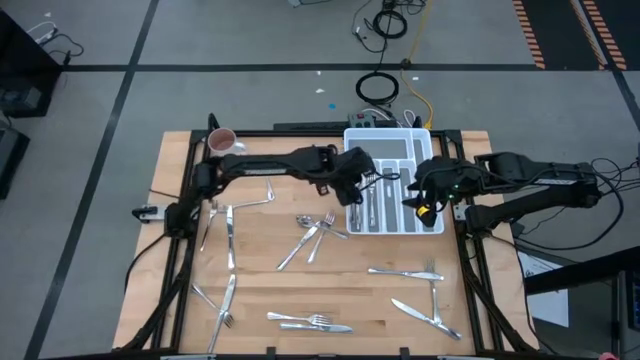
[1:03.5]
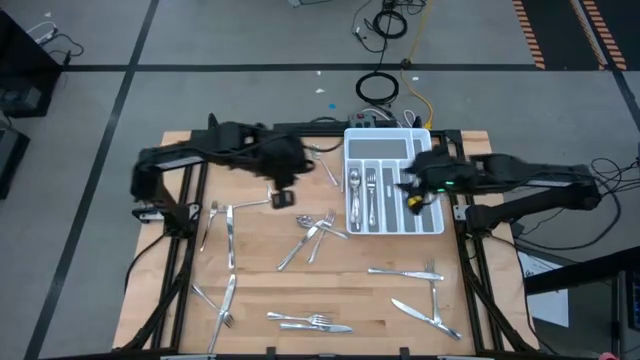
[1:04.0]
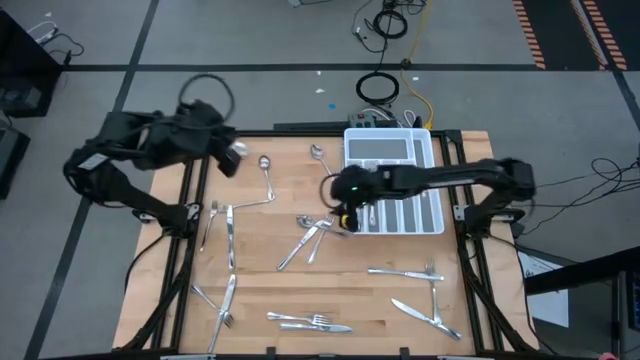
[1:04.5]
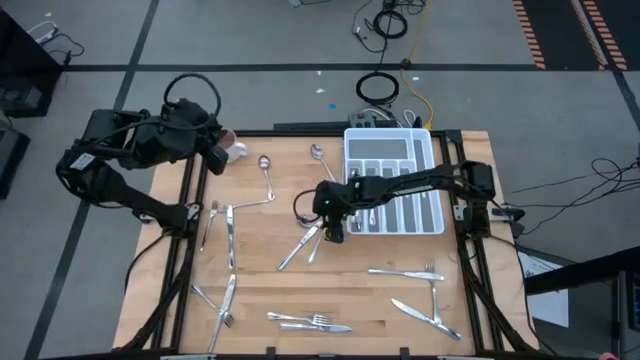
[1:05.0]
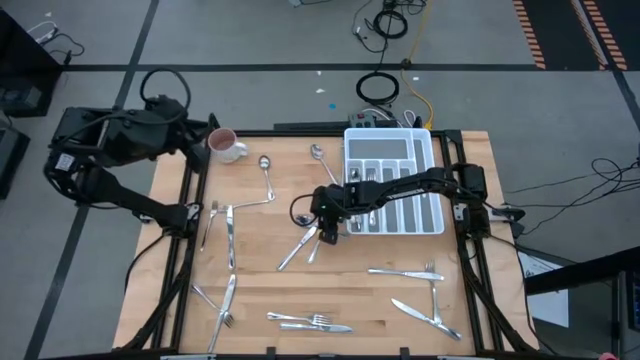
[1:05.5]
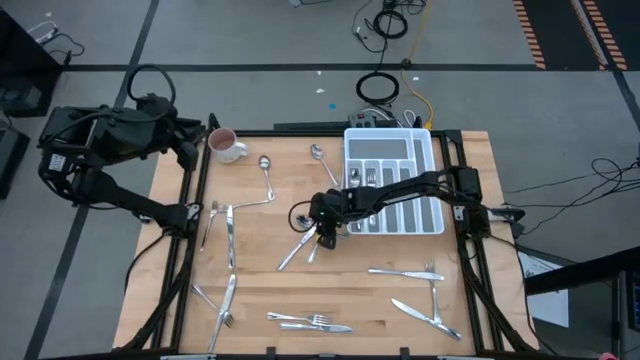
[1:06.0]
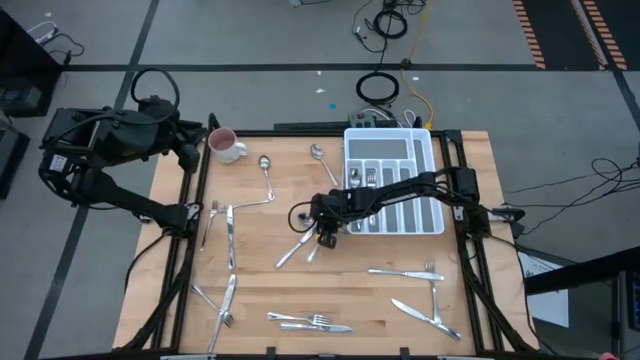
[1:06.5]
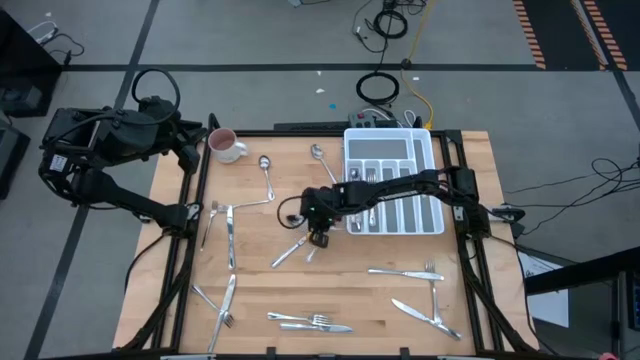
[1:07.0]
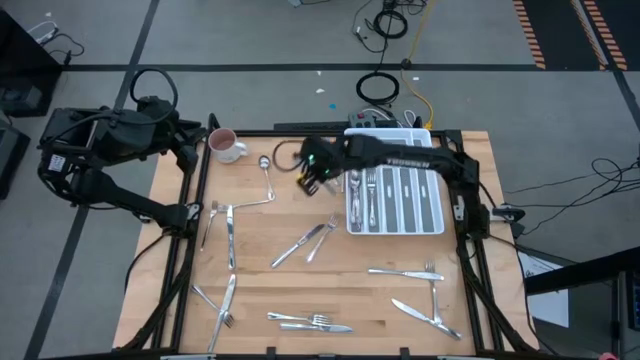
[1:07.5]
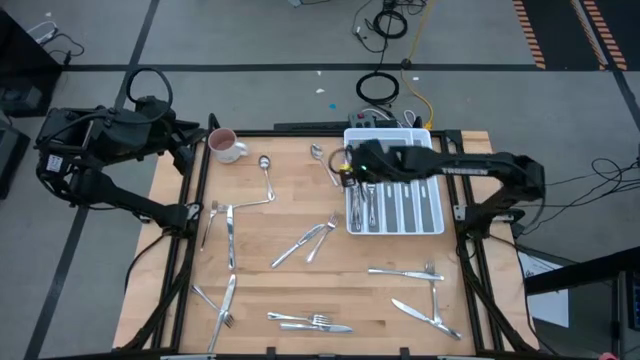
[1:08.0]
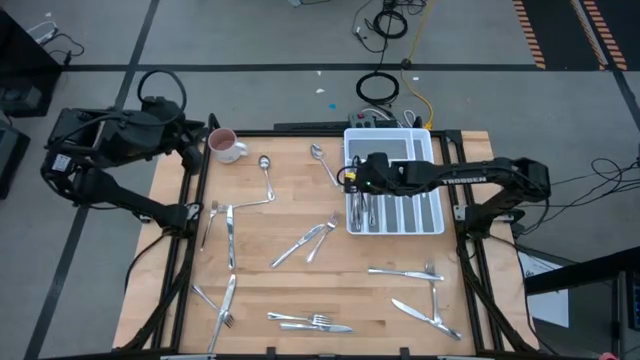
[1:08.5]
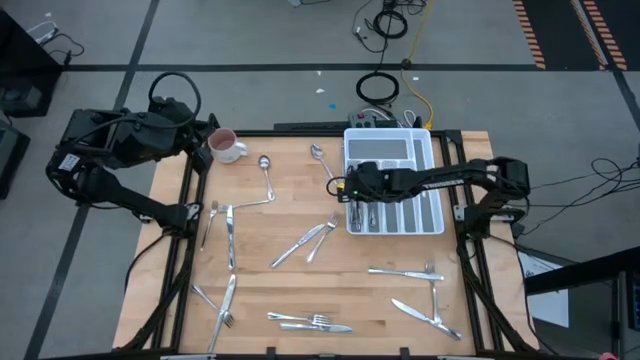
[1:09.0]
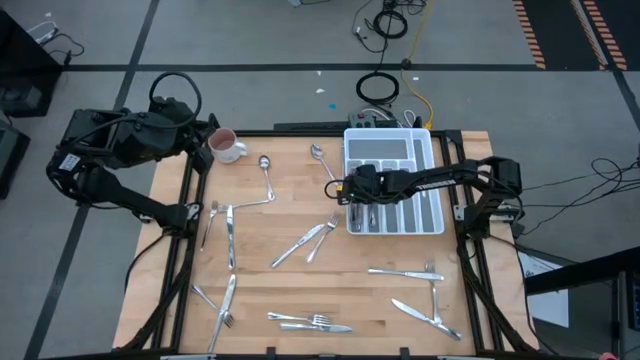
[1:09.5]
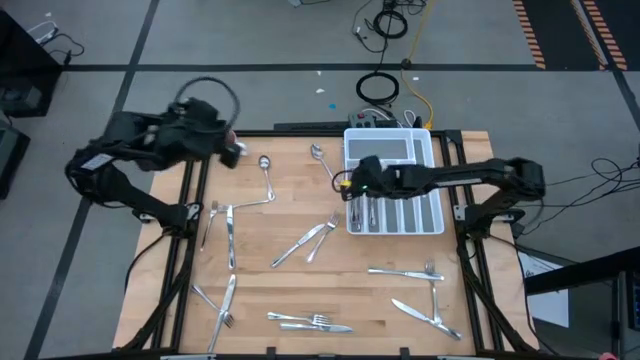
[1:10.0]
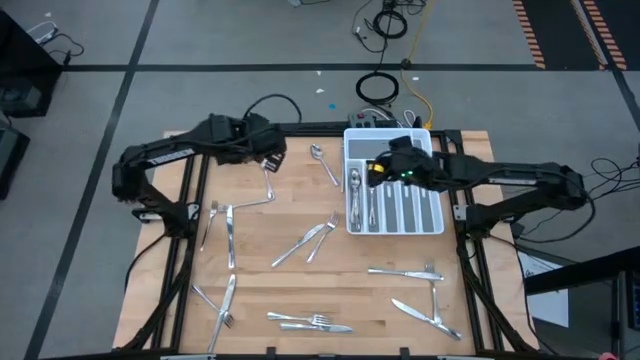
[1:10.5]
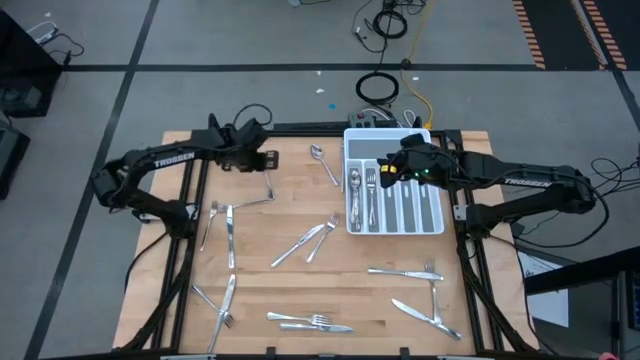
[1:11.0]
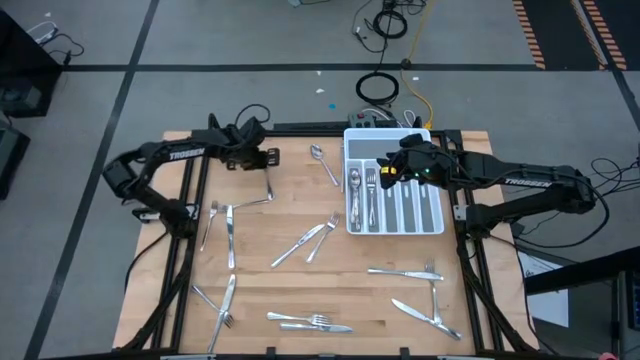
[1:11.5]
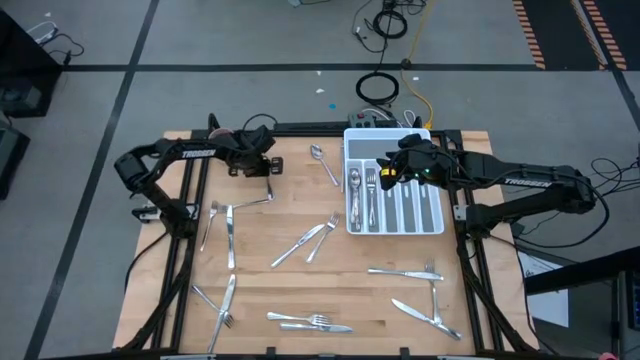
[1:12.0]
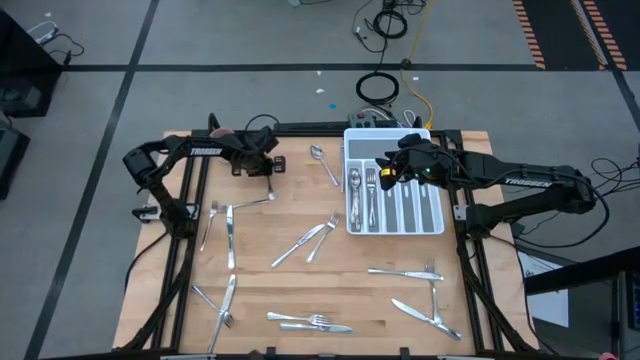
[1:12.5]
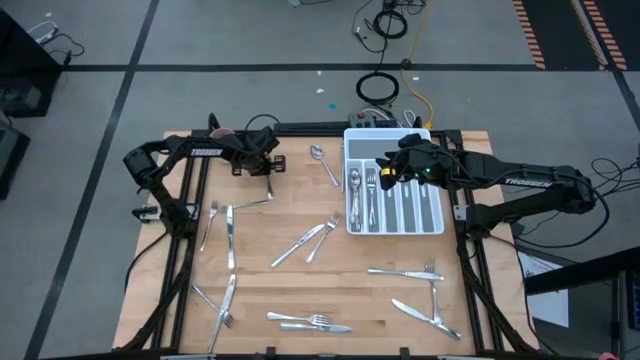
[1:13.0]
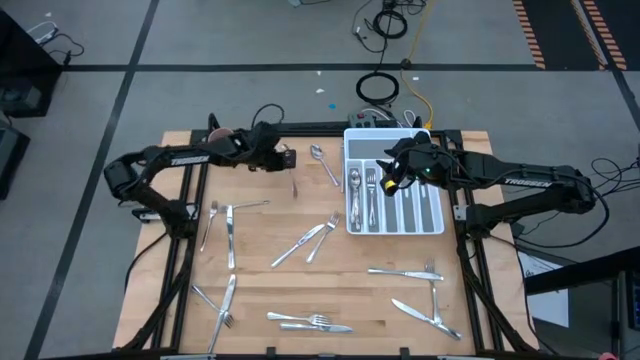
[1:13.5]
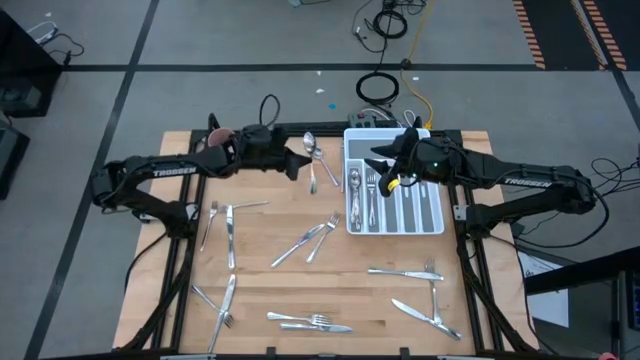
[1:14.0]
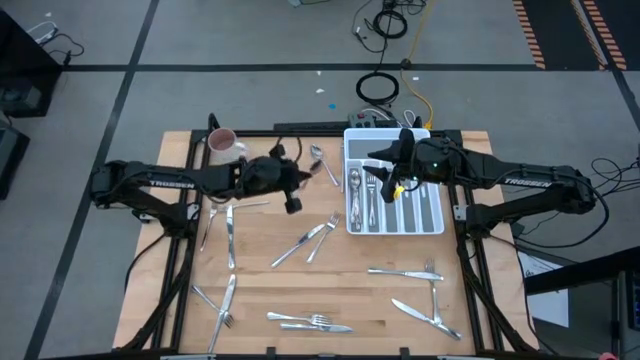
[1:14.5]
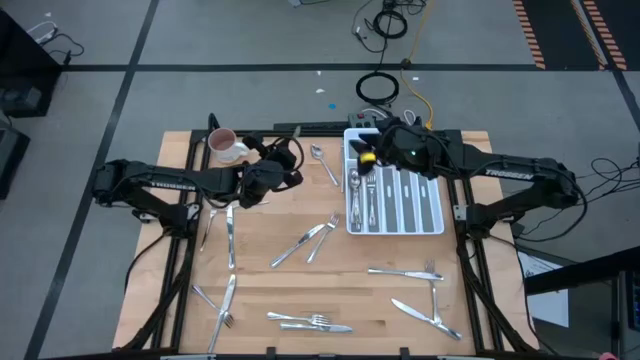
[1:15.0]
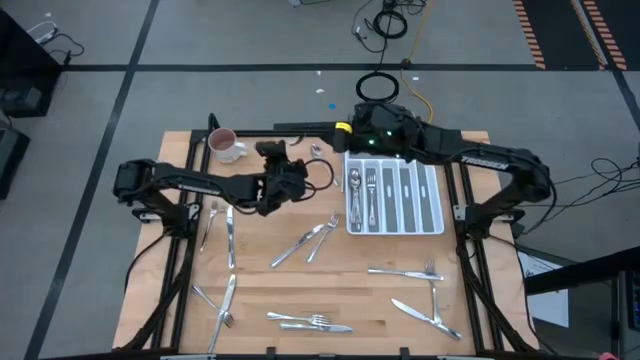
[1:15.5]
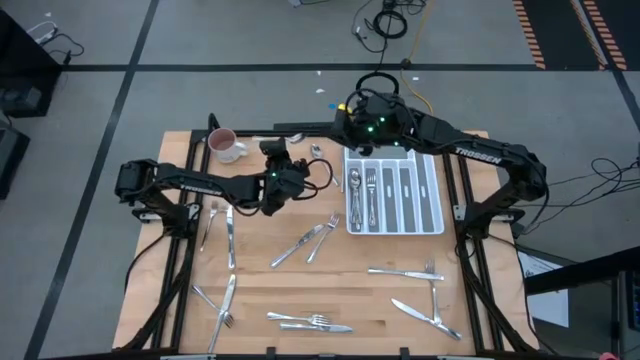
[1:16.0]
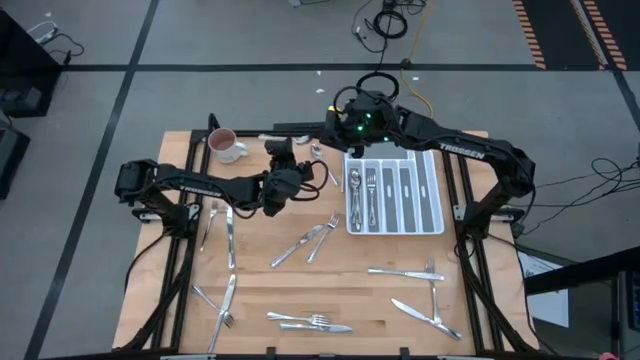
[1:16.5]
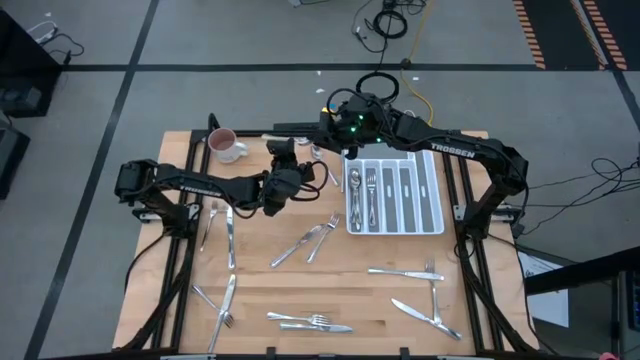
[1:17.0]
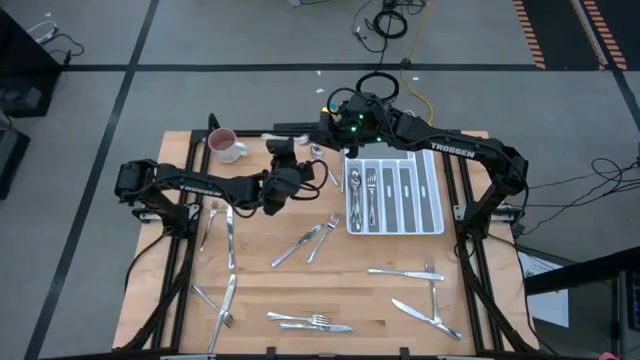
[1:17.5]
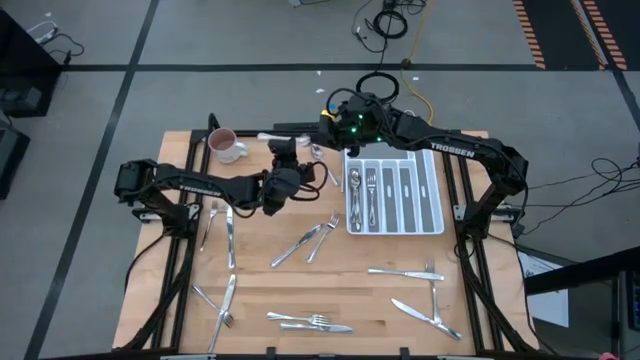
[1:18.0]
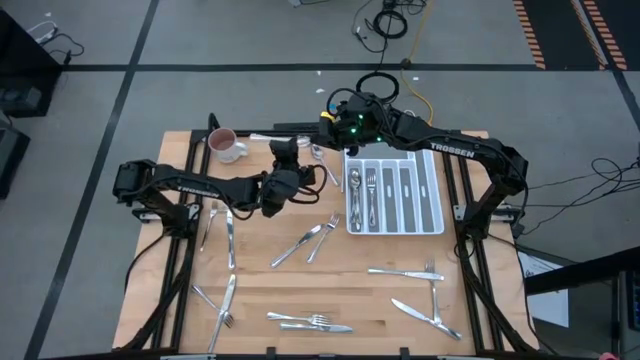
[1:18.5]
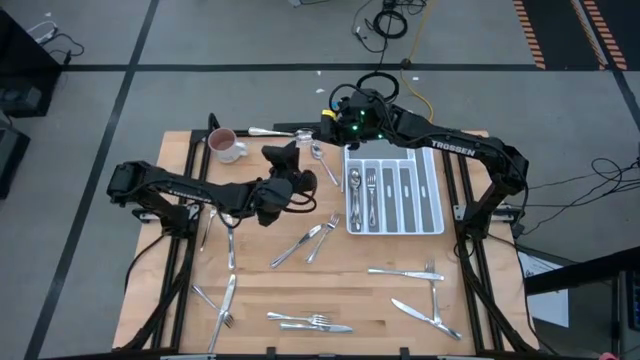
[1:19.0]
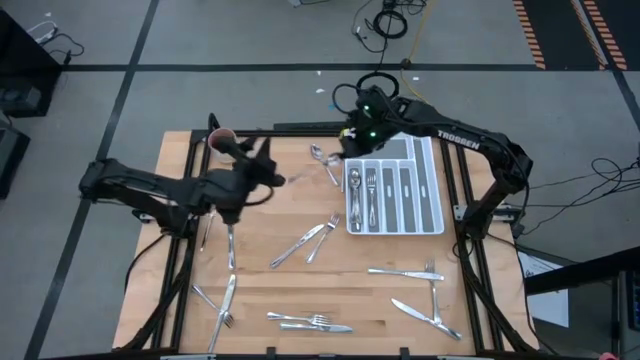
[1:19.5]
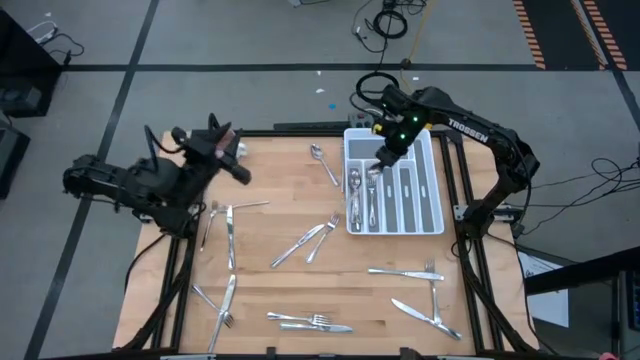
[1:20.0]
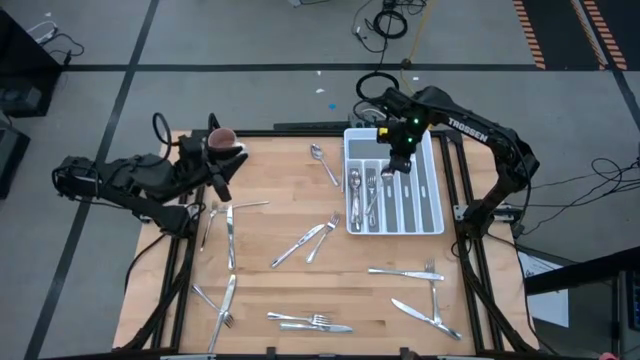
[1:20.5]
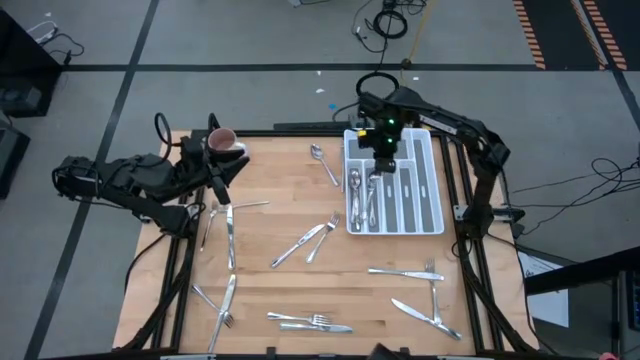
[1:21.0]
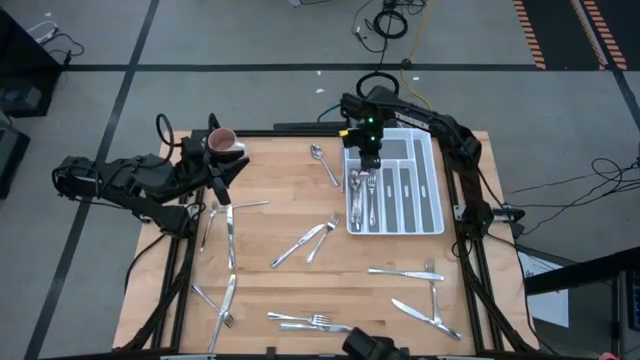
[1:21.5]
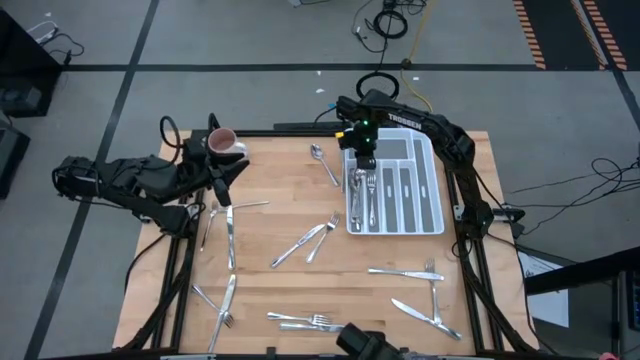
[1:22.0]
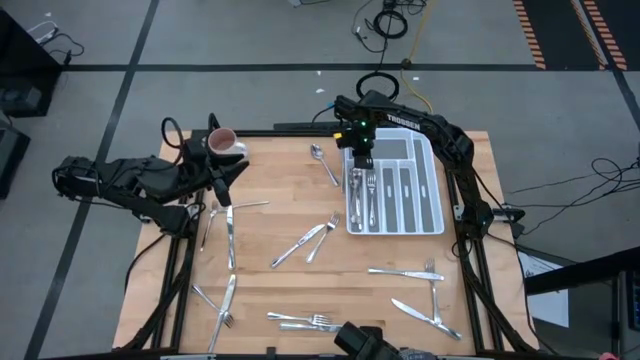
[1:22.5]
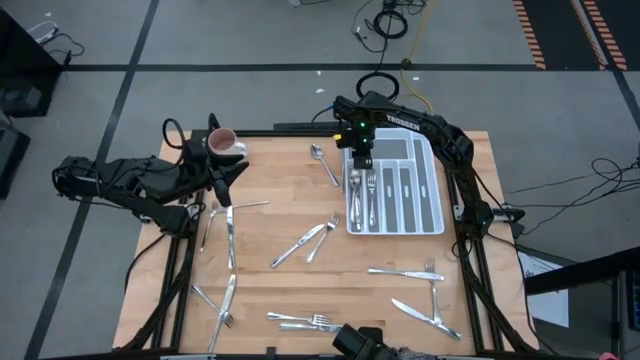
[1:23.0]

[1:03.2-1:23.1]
Task: Sort silverware
Put the silver spoon into the silverware tray

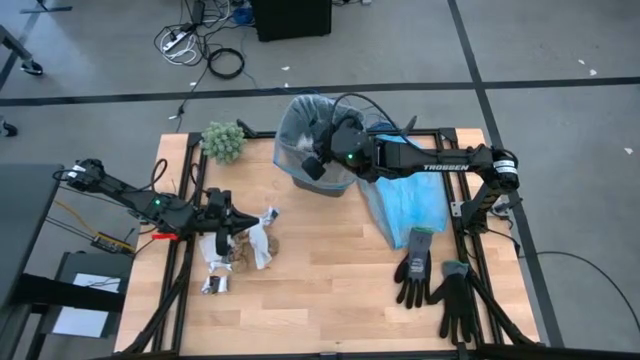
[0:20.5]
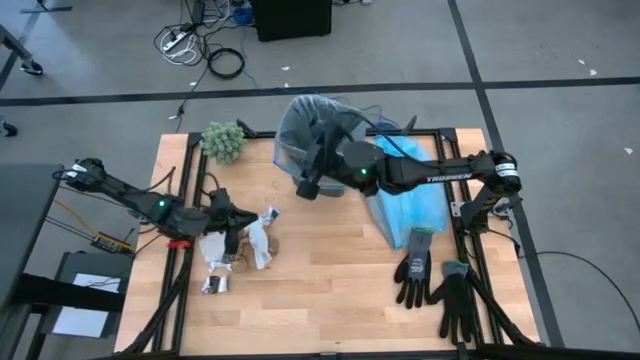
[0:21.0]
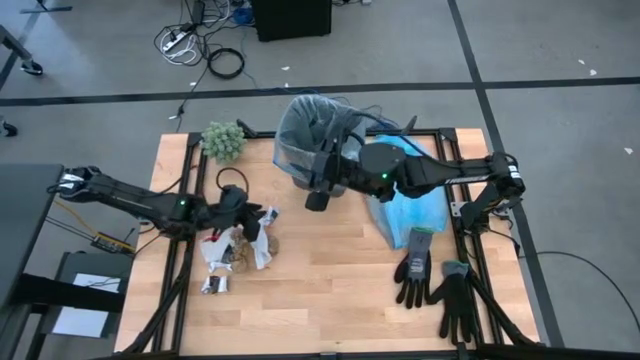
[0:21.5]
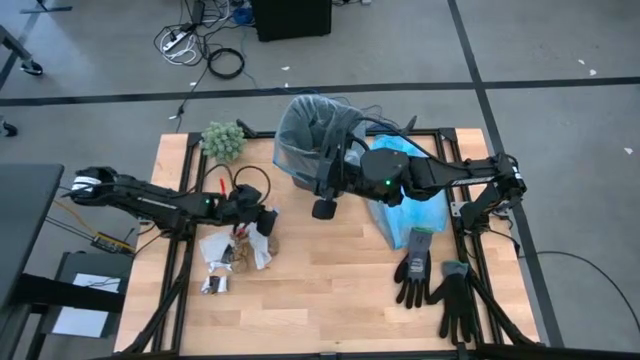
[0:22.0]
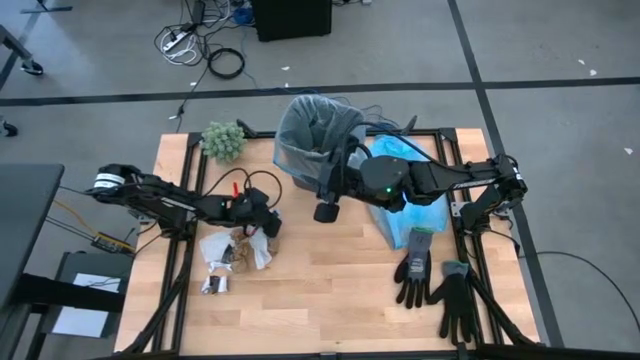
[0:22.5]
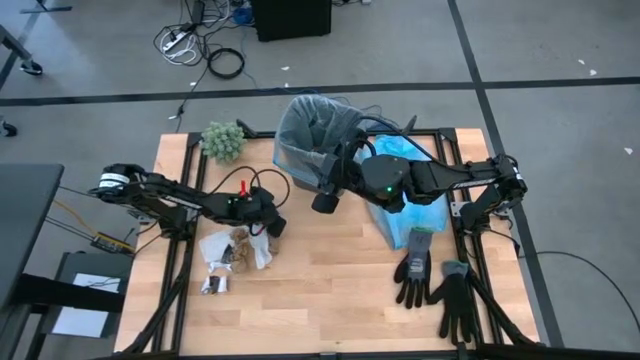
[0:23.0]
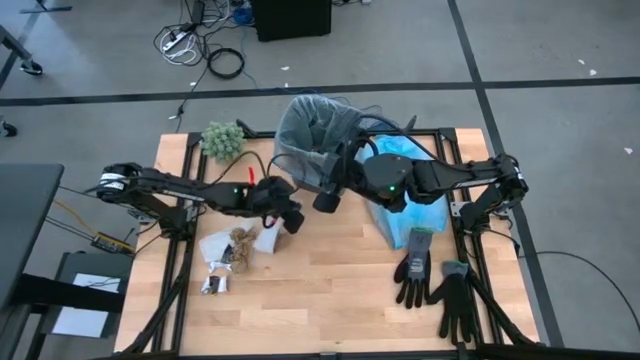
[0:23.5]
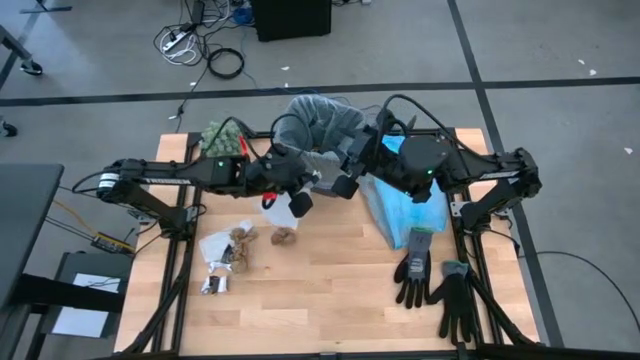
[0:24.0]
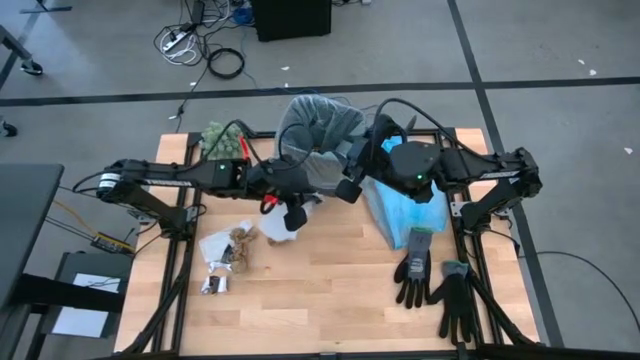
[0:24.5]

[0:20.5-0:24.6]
Task: place trash/remove bag and relplace
Put the white napkin into the trash bin
